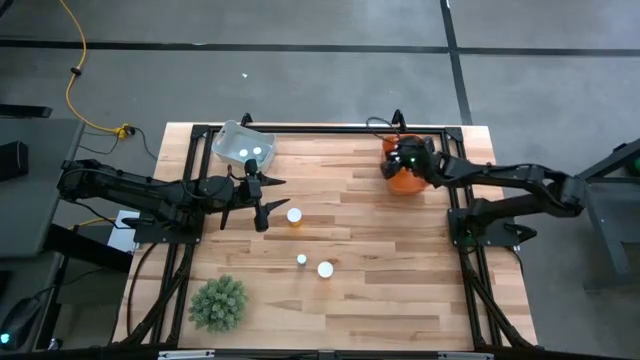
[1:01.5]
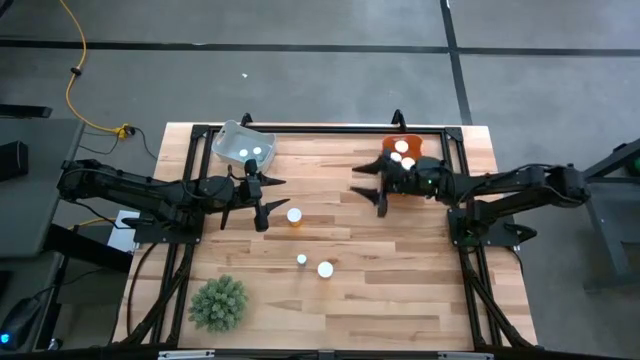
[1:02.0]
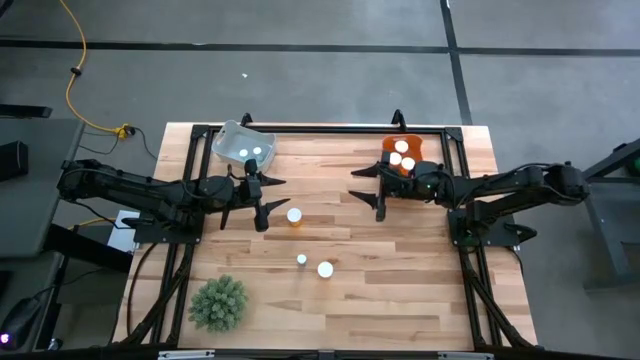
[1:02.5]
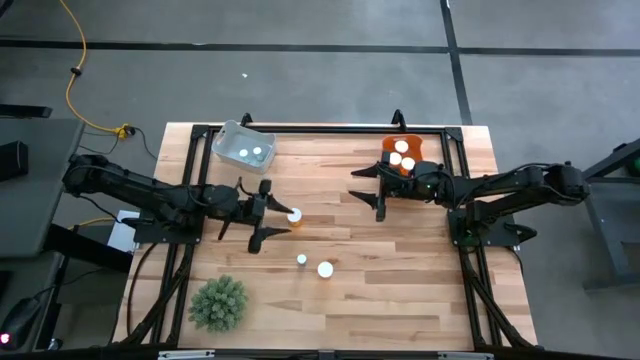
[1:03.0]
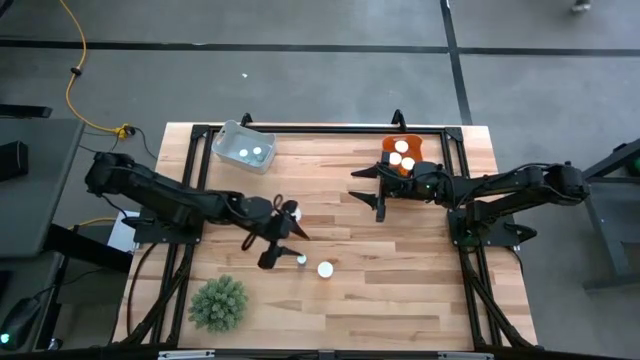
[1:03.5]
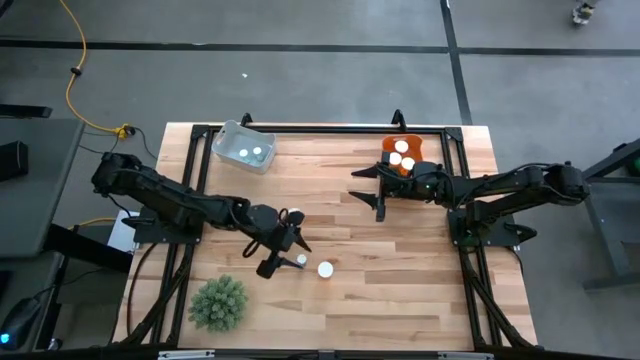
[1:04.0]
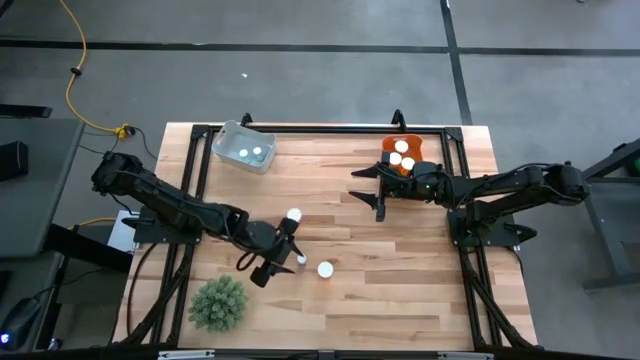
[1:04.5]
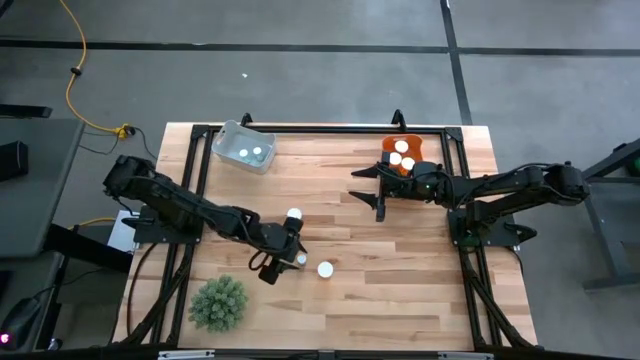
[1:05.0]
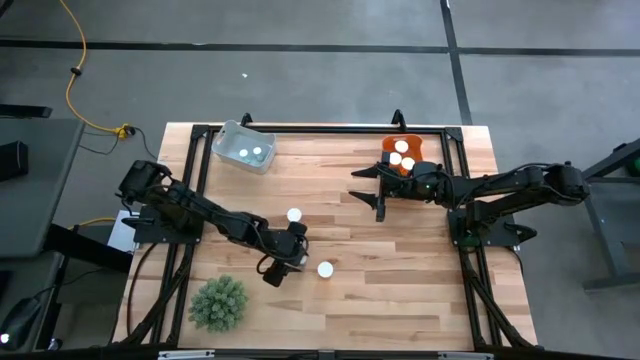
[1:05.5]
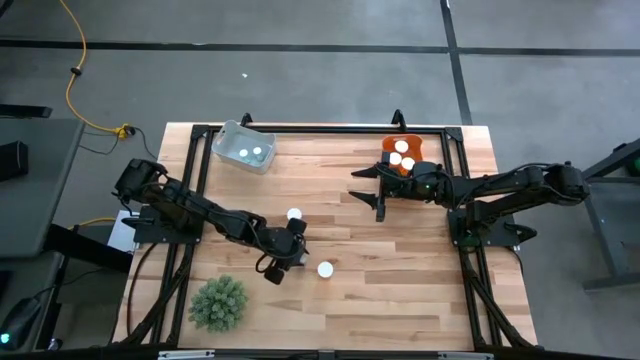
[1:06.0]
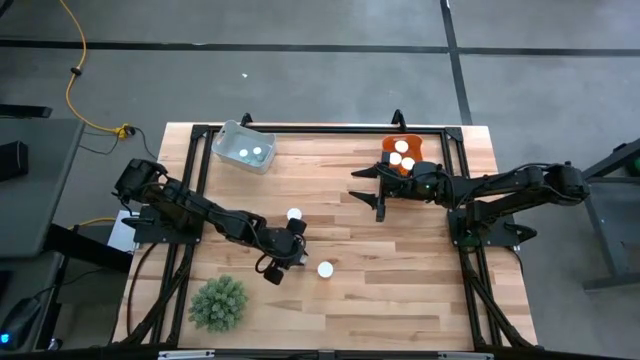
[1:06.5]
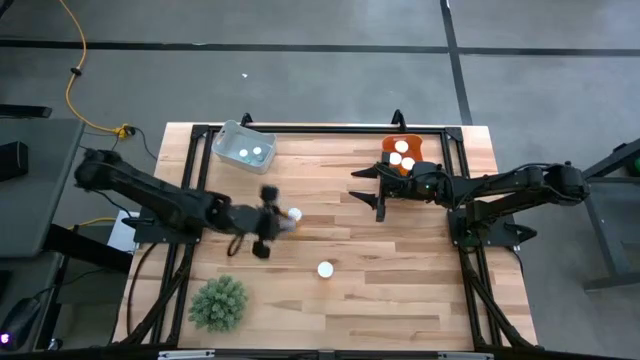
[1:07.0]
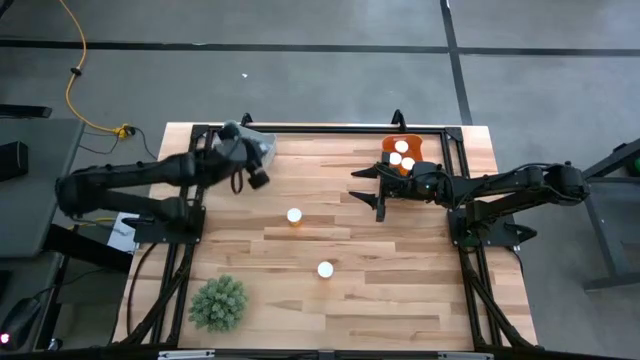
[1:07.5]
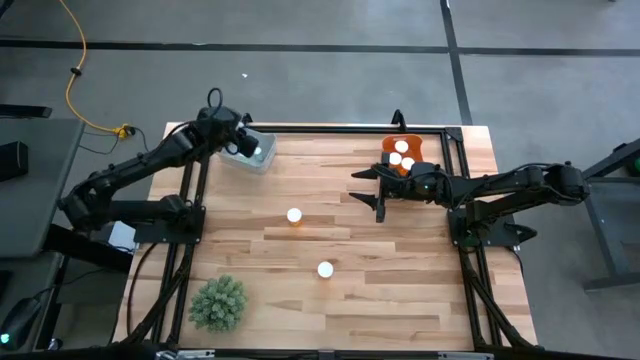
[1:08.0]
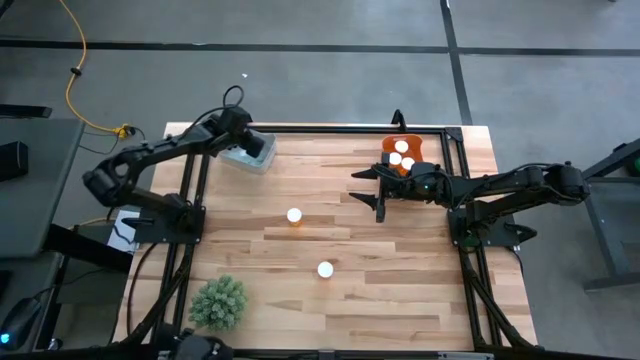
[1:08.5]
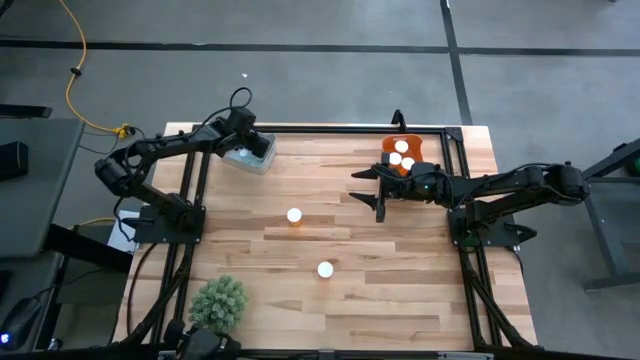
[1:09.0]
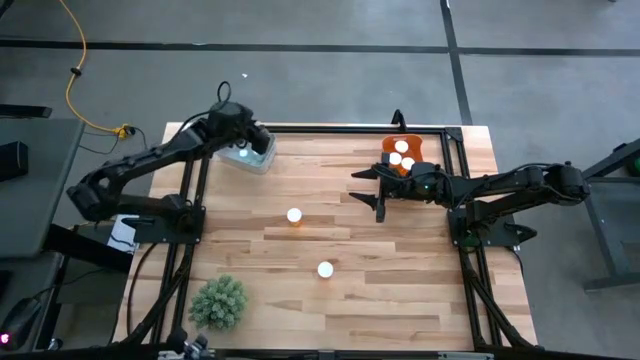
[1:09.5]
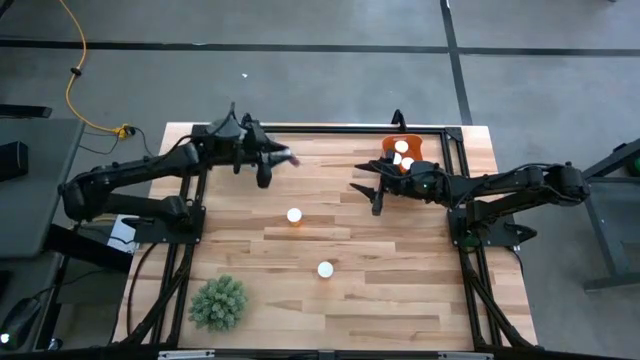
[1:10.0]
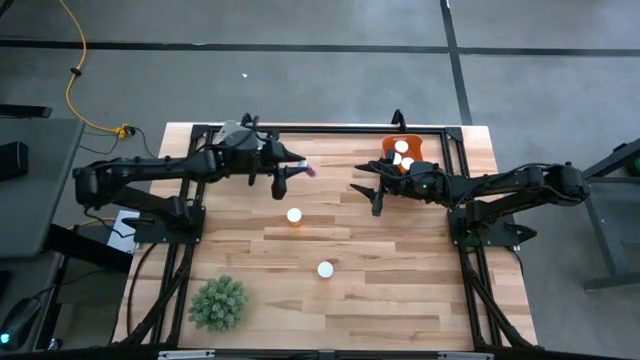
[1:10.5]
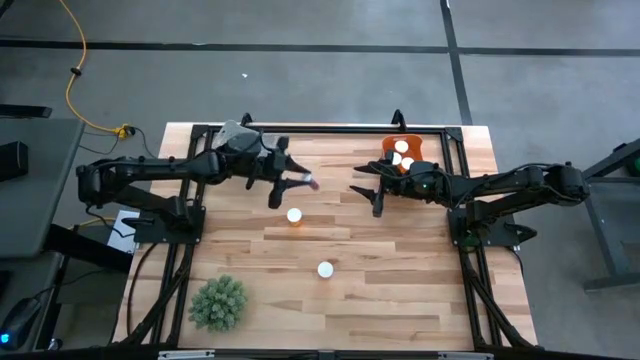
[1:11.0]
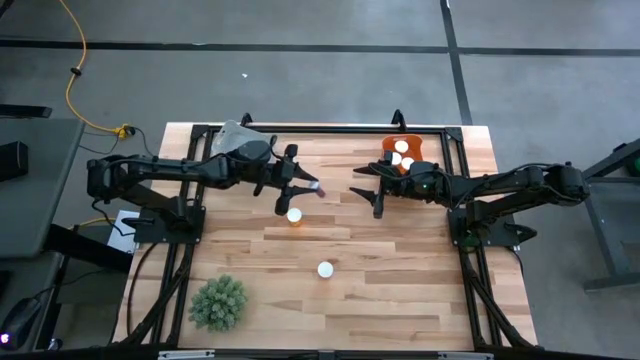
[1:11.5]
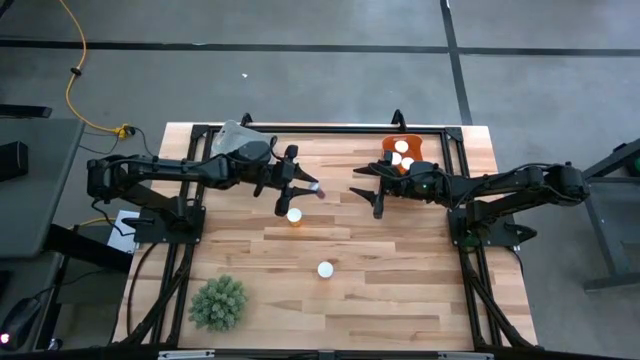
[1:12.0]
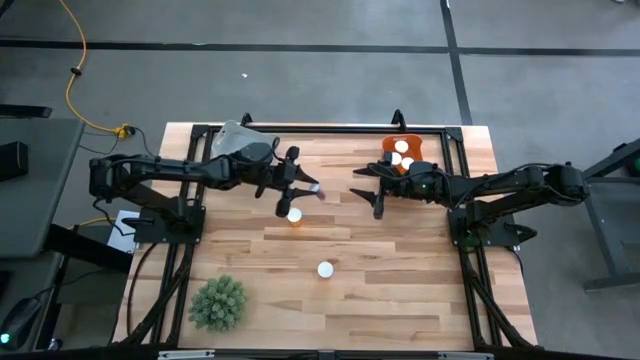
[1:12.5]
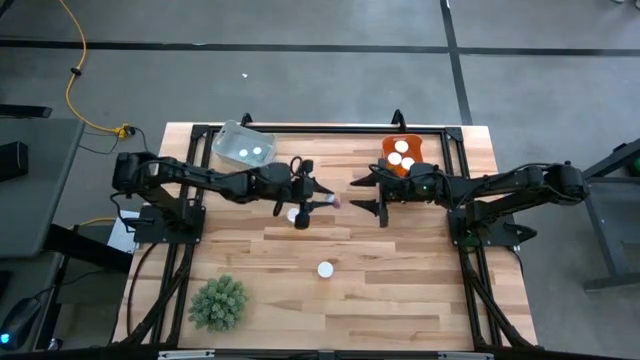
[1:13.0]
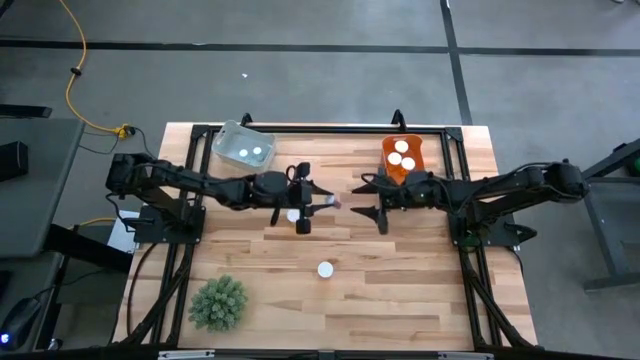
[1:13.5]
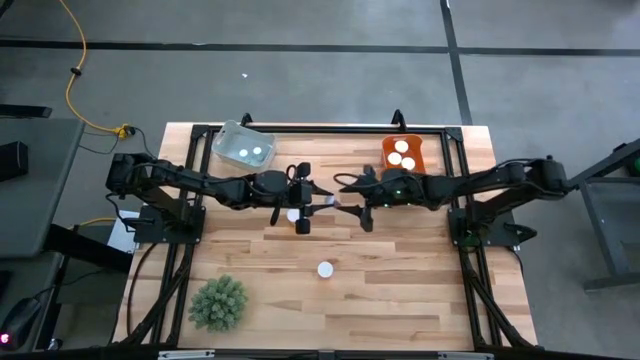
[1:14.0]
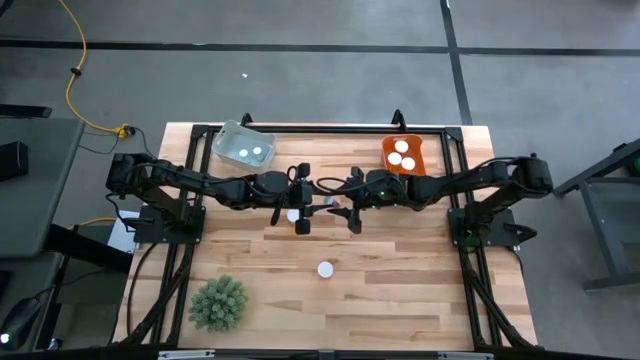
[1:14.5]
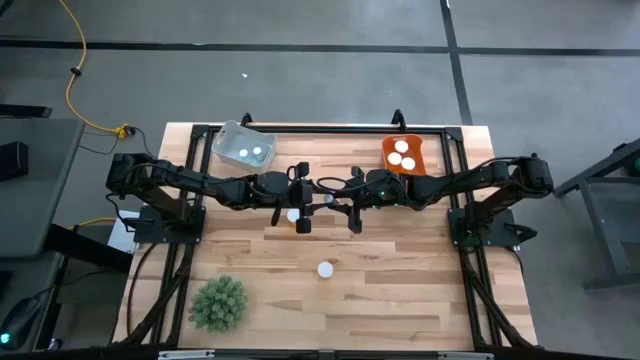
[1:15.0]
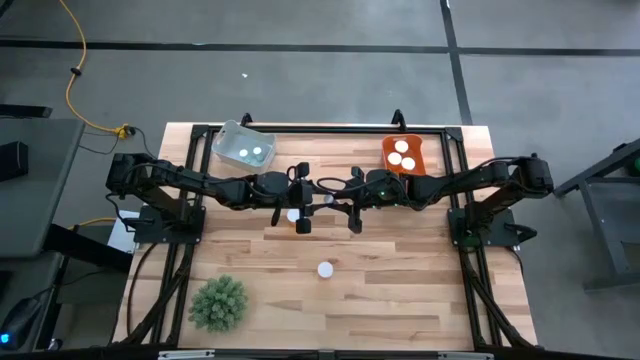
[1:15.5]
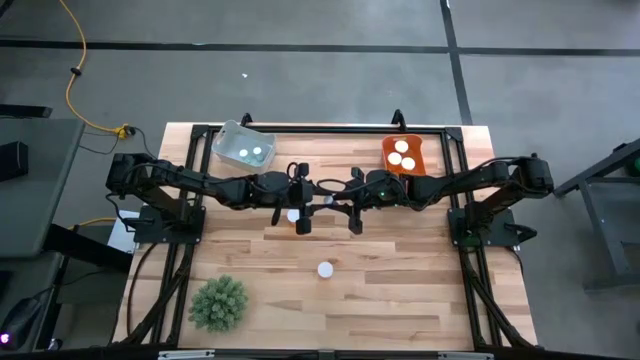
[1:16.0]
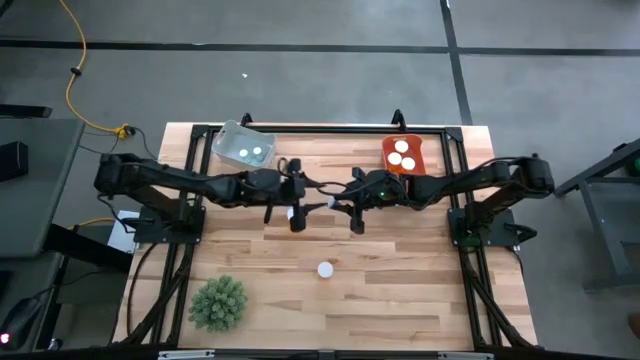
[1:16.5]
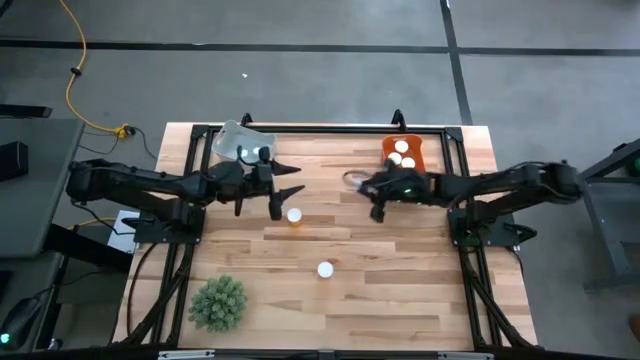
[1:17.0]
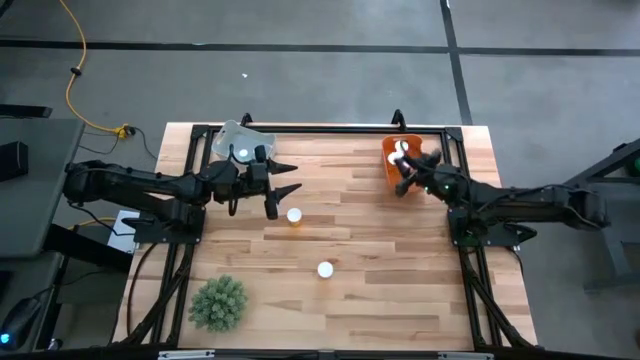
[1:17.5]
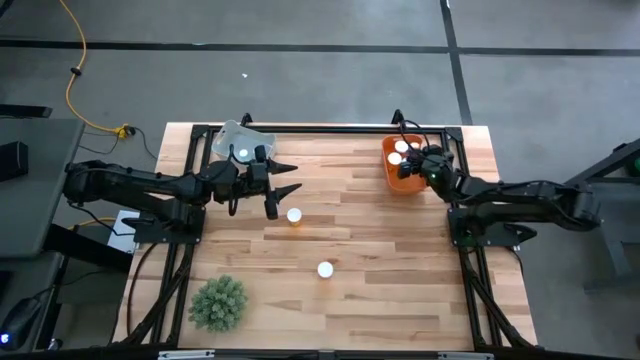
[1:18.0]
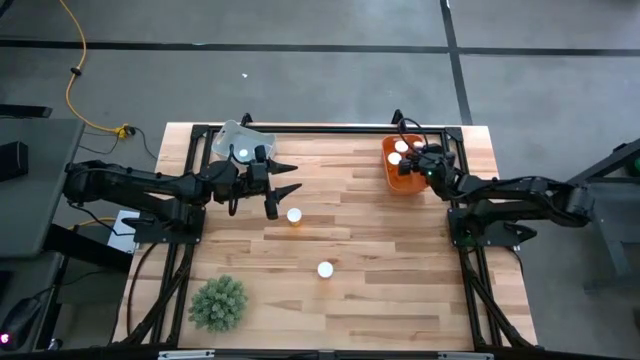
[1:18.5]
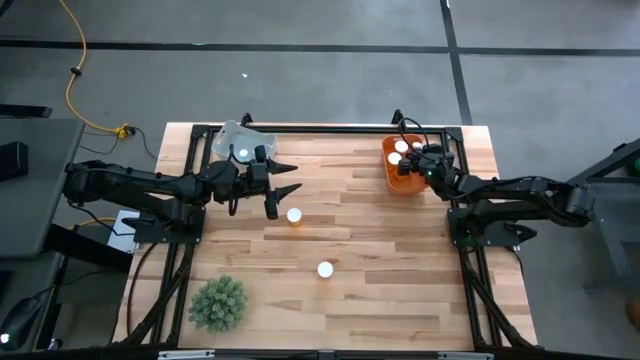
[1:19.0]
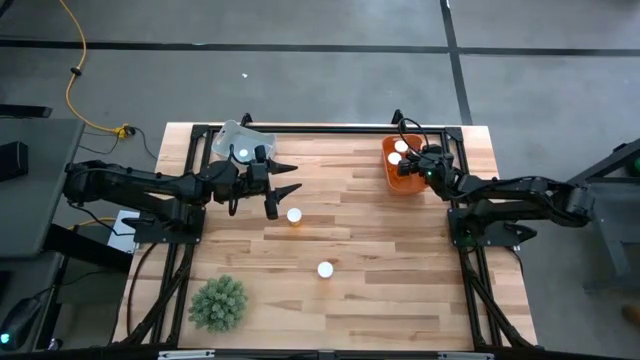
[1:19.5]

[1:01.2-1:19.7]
Task: Pick and place medicine bottles into bin by pill shape (circle, oval)
Put the blue capsule bottle into the orange bin
